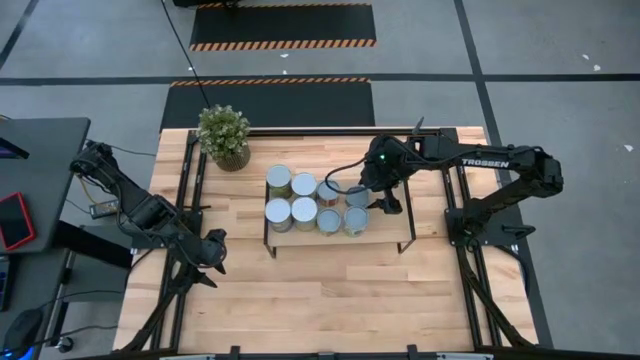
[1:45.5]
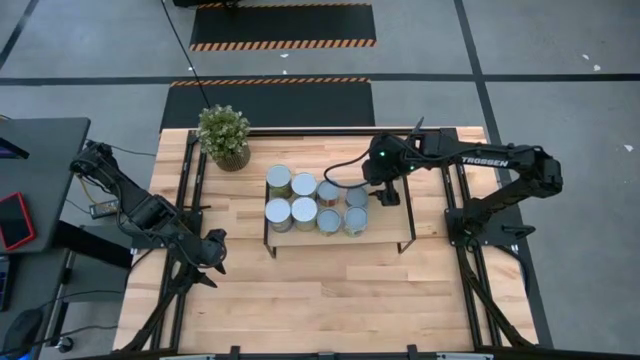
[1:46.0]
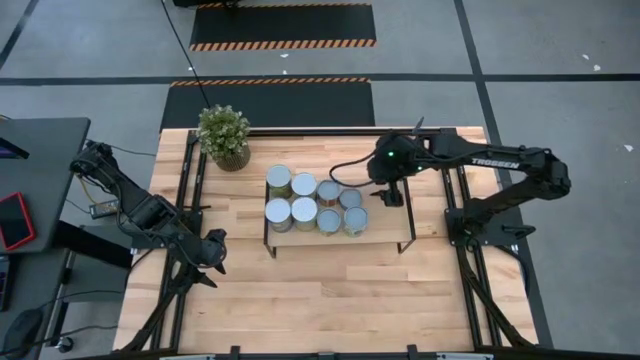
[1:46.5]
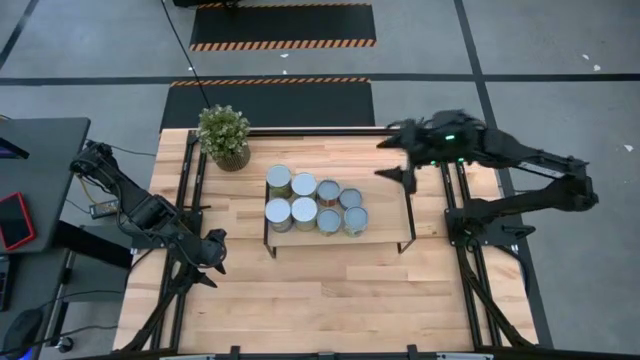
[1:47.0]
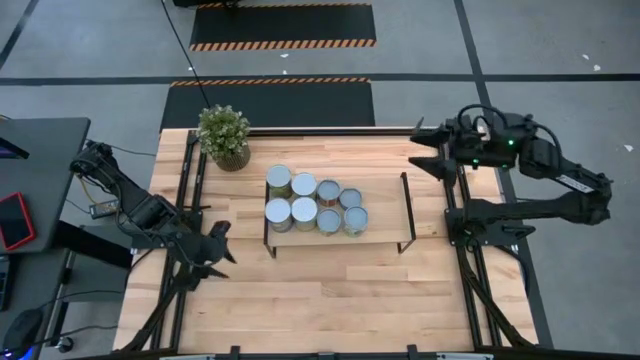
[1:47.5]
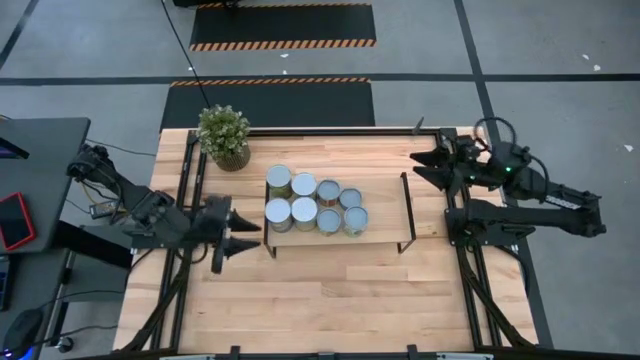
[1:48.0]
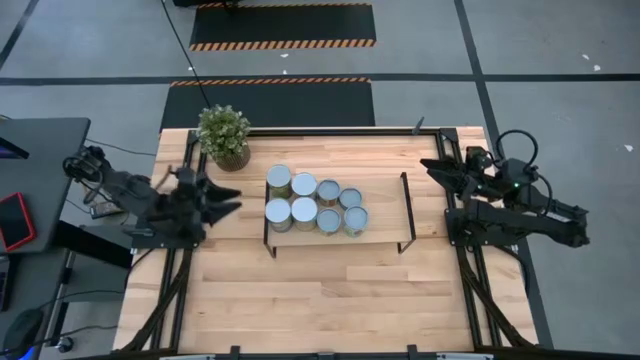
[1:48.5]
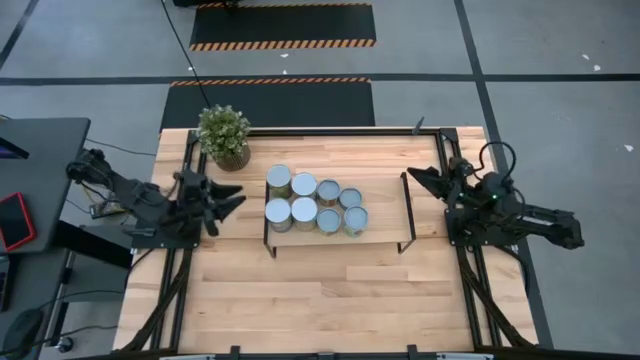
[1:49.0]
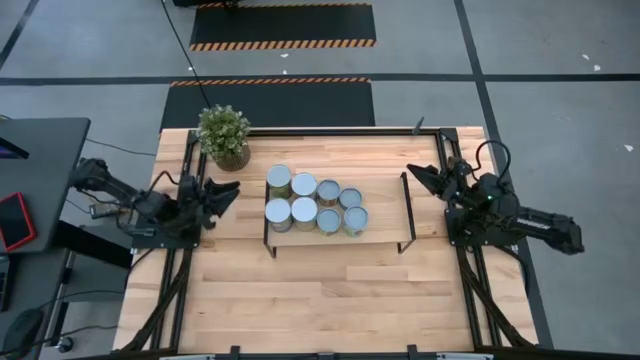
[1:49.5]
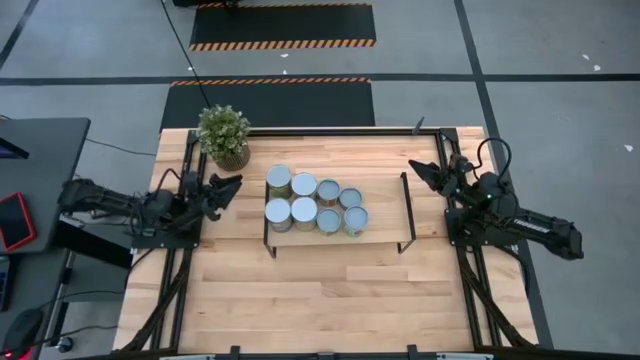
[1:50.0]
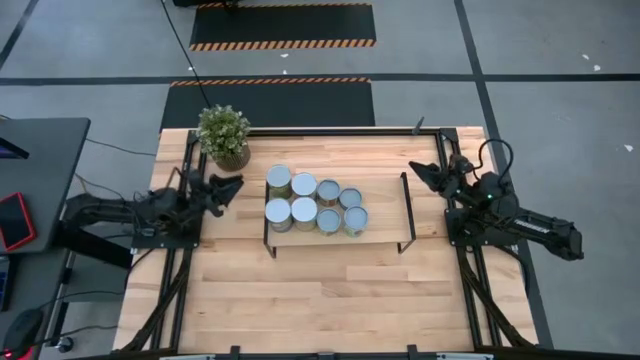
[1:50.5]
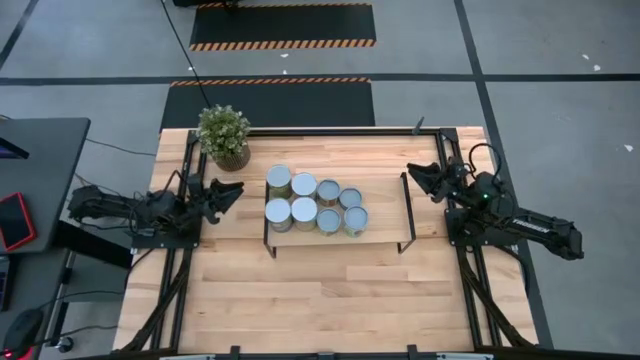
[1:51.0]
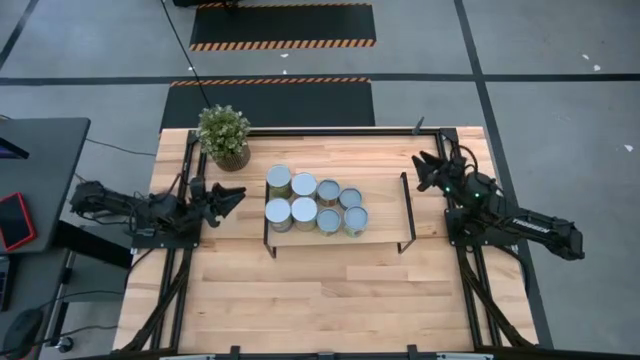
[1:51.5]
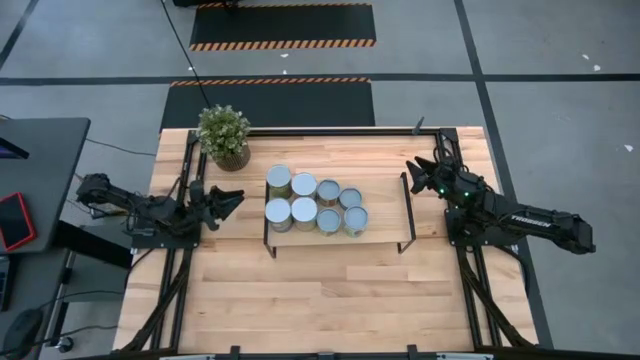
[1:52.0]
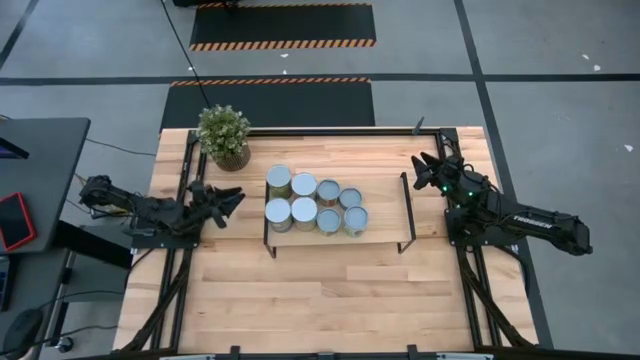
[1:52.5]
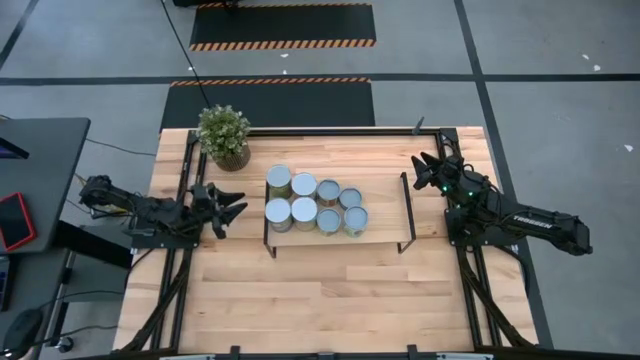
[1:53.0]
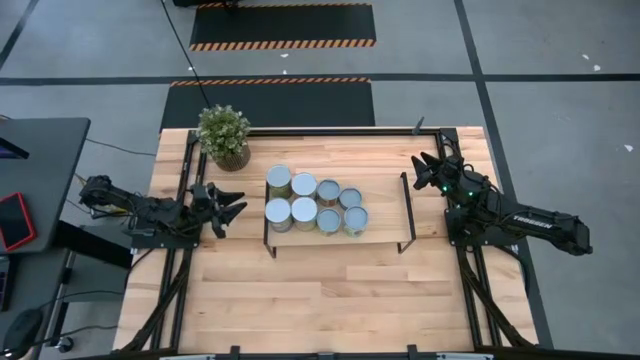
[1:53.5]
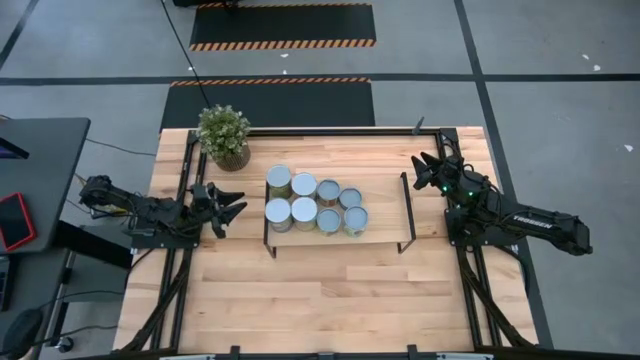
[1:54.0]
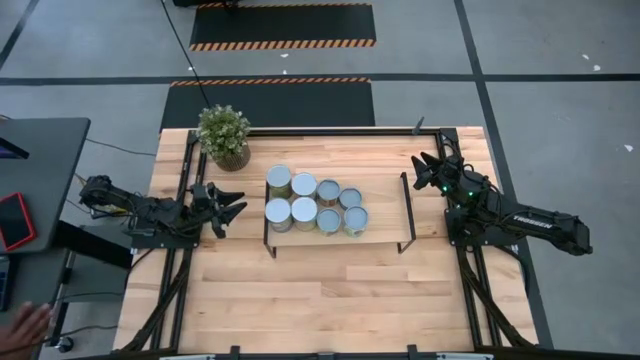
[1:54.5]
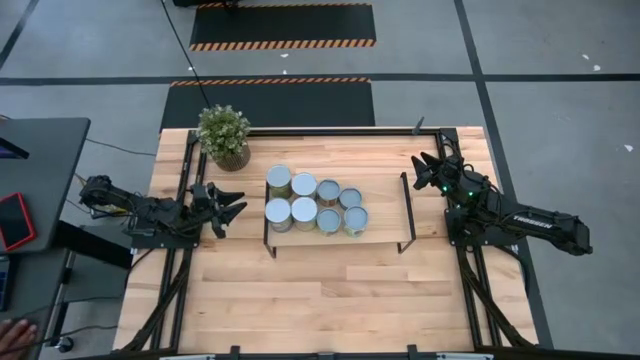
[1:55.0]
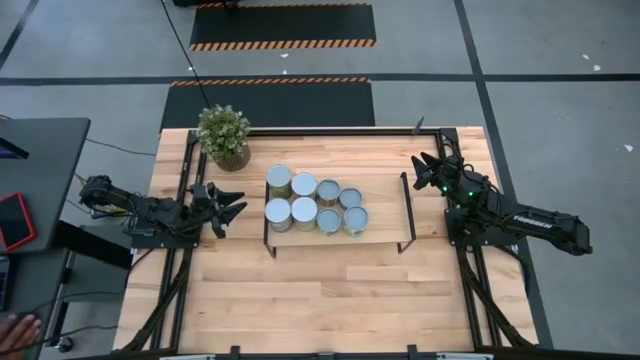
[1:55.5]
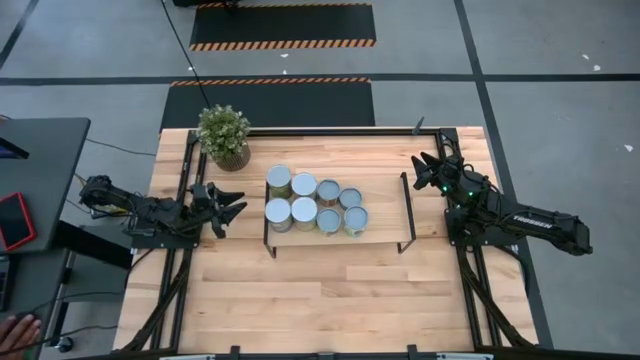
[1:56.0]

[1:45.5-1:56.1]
Task: Pick and place cans onto a shelf
Return to Home Position

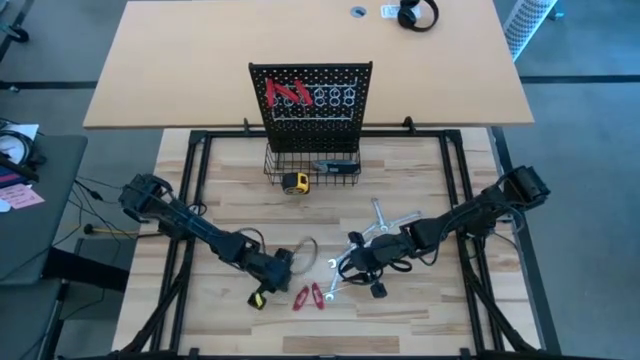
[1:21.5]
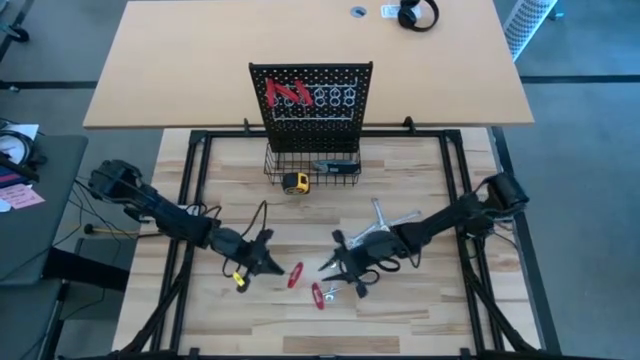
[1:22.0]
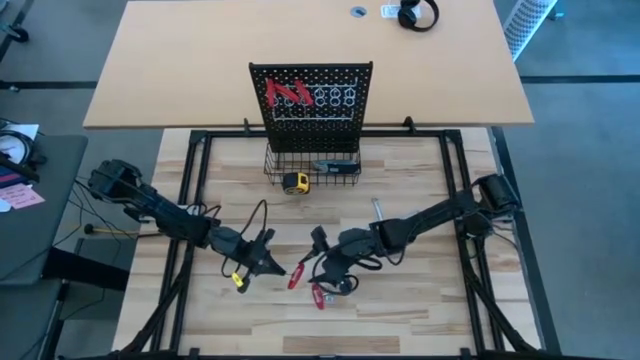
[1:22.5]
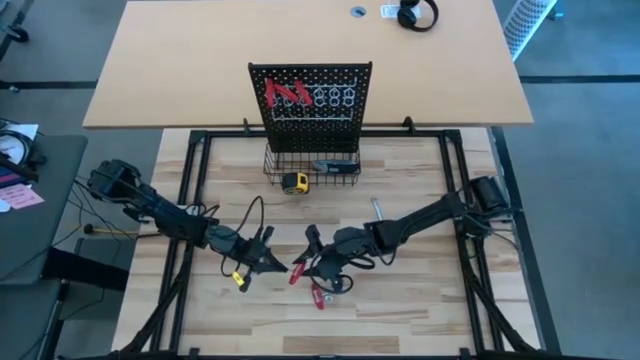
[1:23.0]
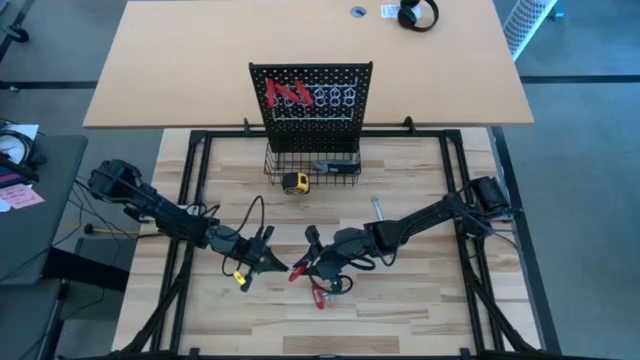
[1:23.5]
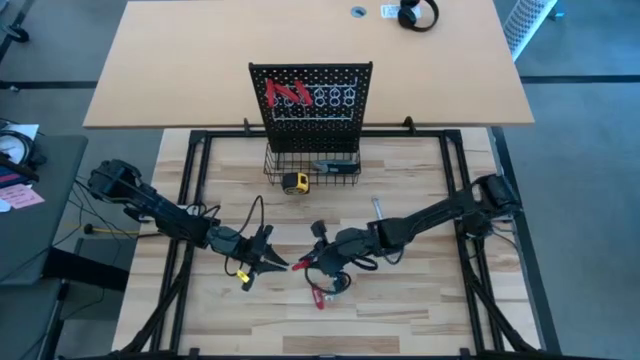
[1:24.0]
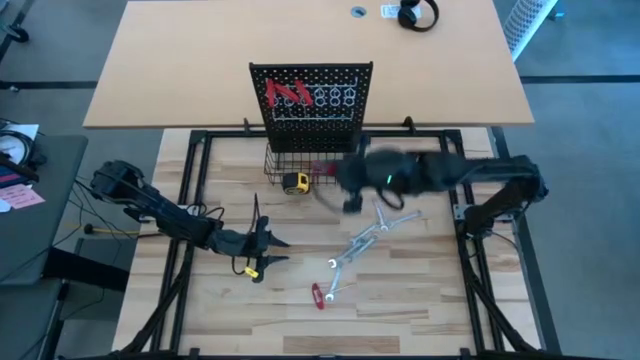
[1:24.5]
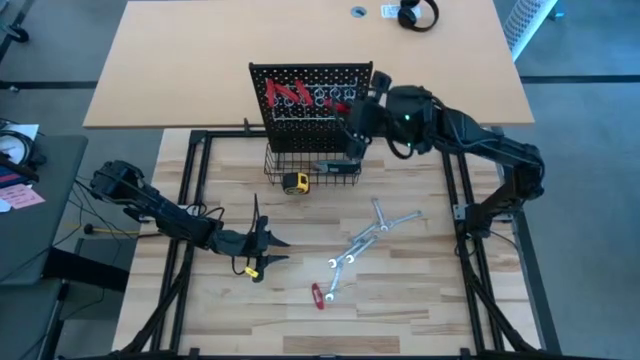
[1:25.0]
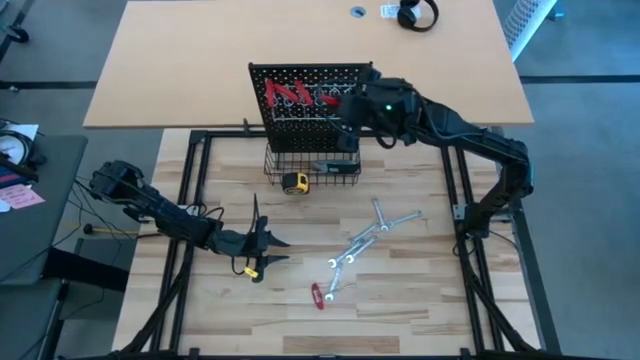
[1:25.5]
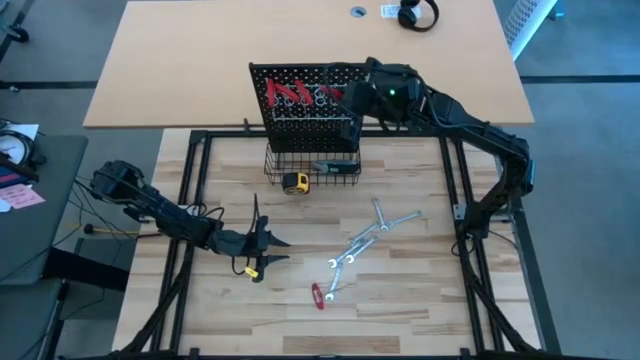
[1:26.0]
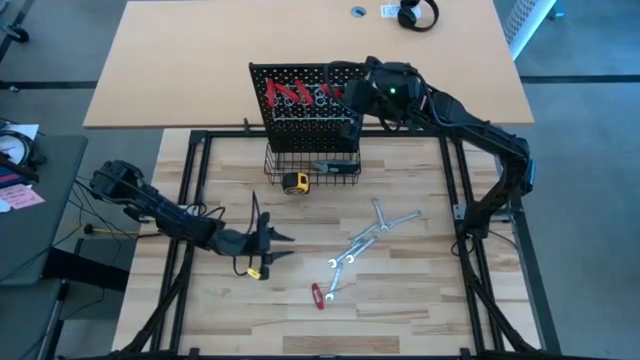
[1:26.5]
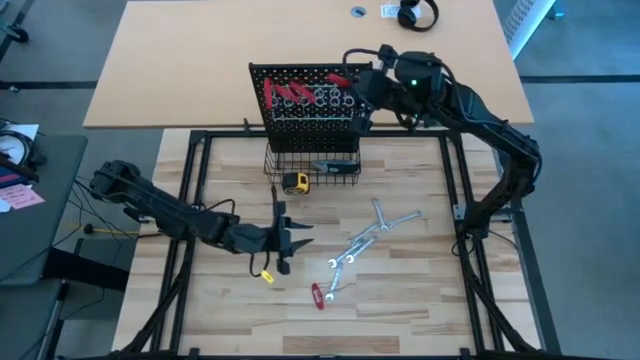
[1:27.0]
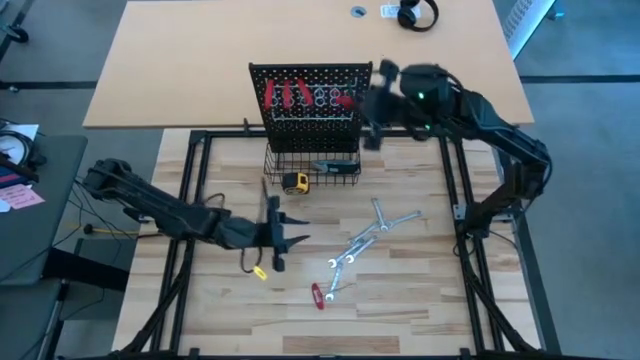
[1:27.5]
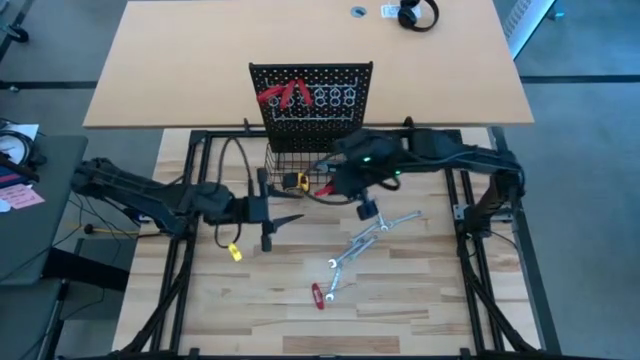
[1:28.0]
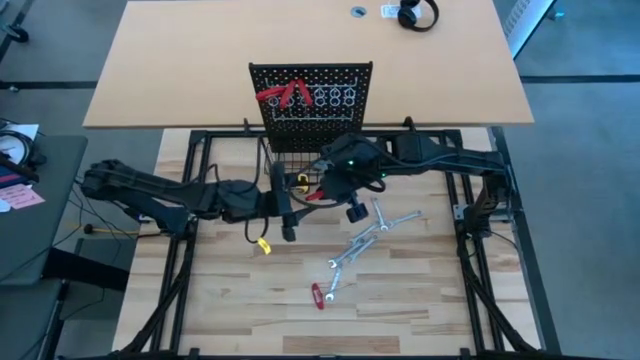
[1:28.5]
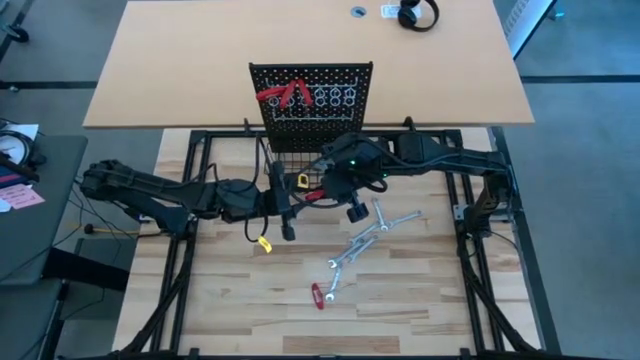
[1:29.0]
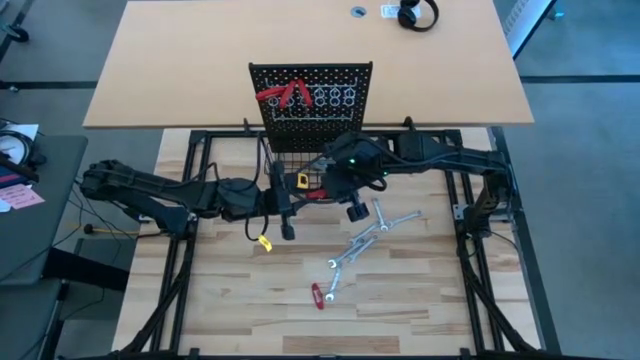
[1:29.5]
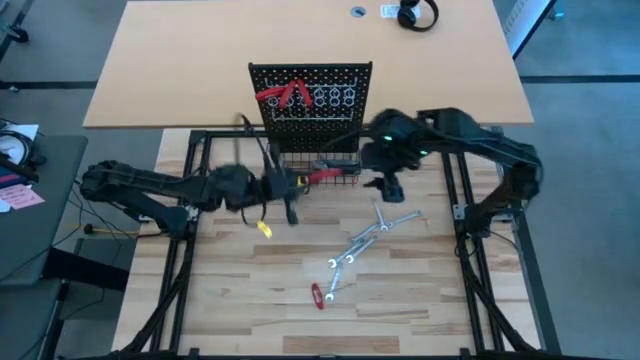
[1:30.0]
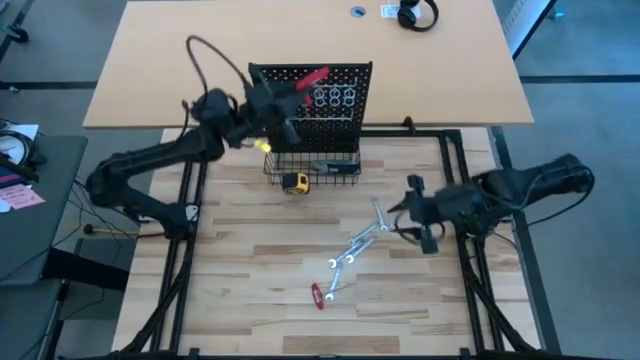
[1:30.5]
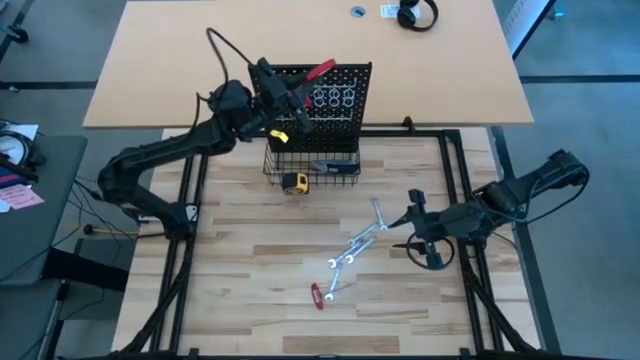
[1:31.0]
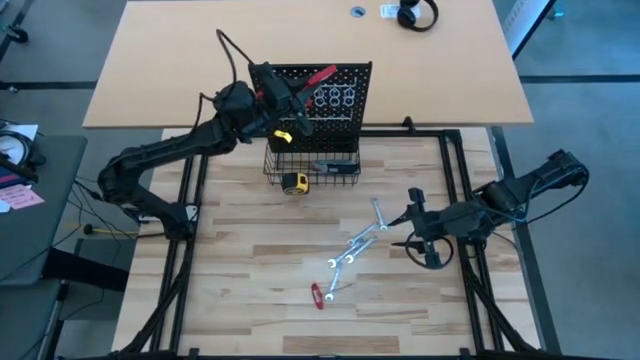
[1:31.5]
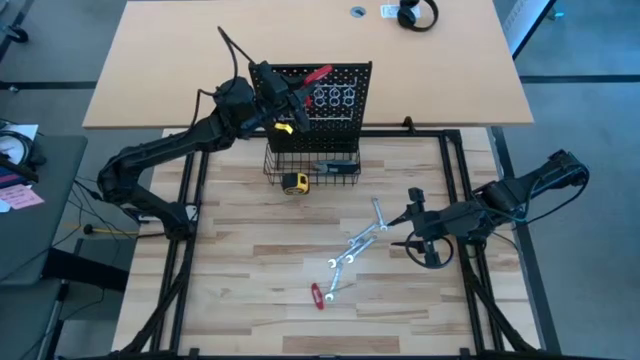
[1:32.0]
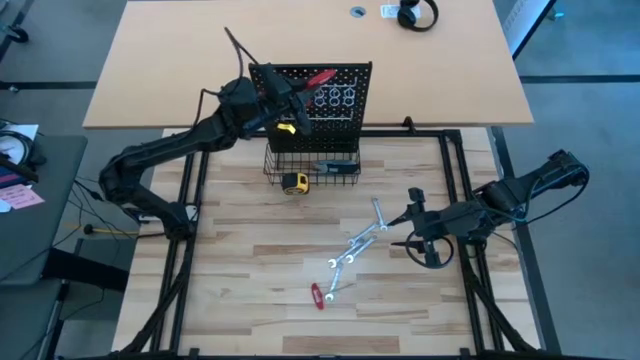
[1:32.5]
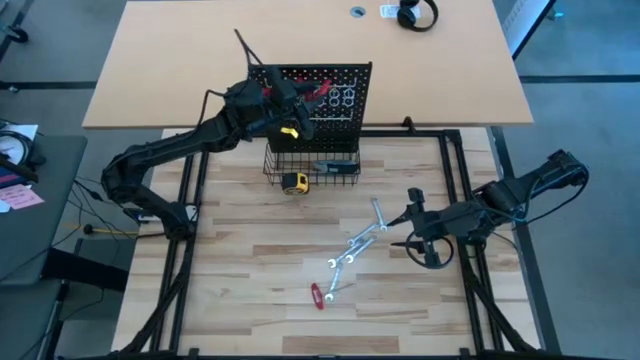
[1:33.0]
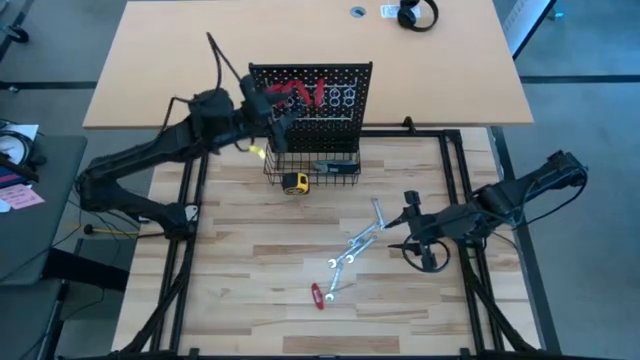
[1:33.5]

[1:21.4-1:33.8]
Task: Hang tools onto peg board
Hang the red T-handle Allen wrench into the pegboard
